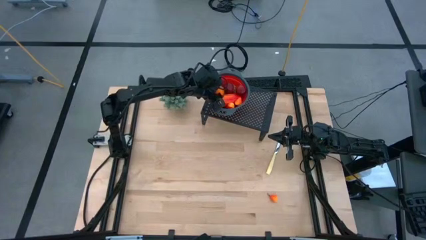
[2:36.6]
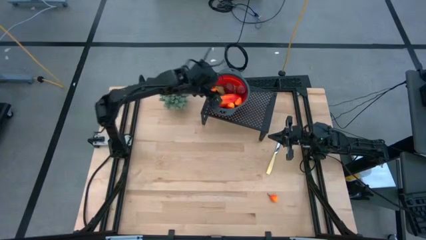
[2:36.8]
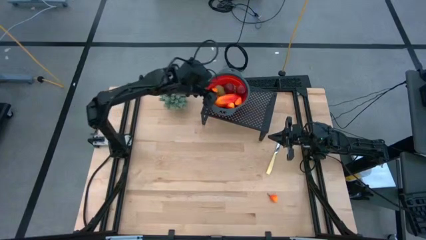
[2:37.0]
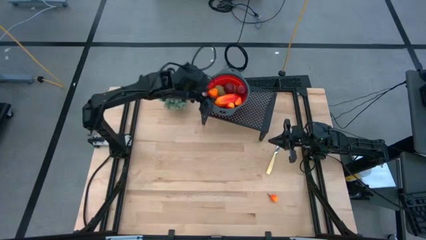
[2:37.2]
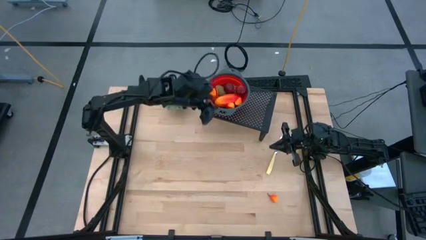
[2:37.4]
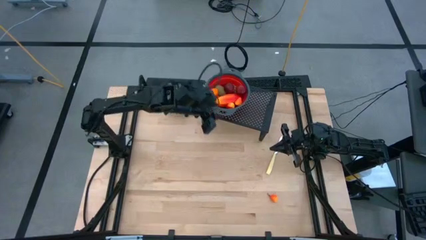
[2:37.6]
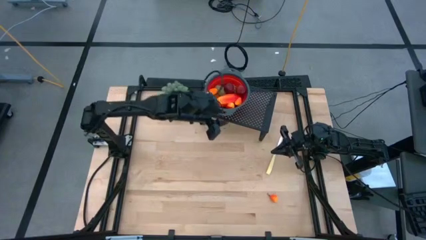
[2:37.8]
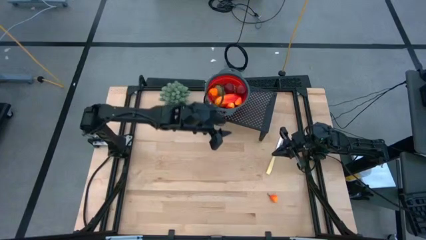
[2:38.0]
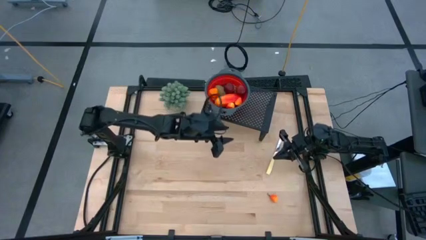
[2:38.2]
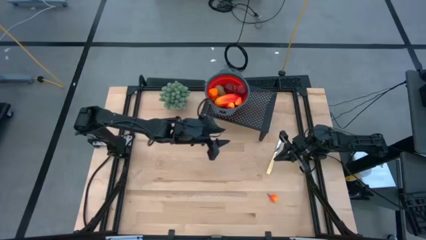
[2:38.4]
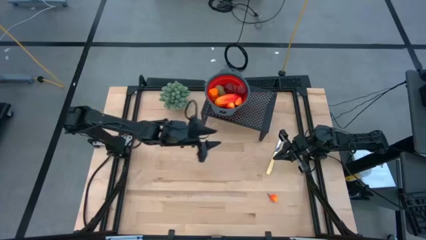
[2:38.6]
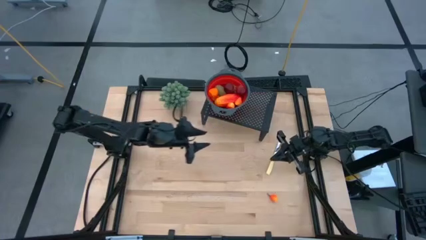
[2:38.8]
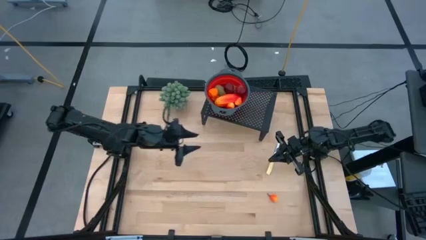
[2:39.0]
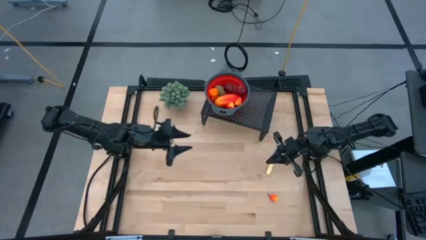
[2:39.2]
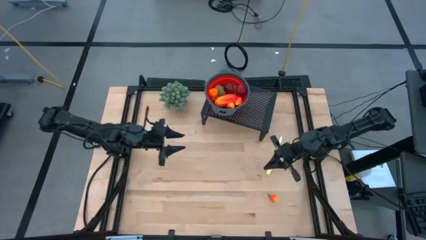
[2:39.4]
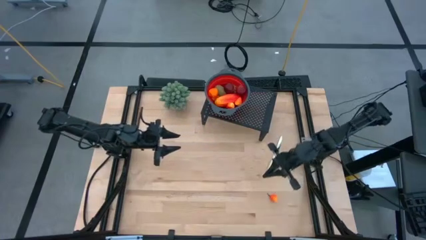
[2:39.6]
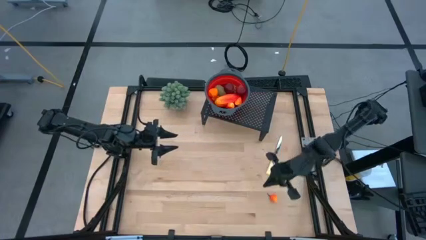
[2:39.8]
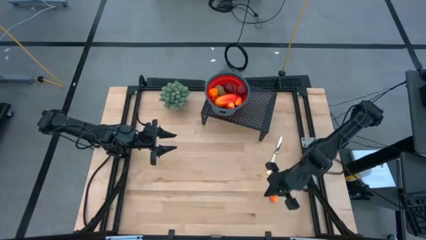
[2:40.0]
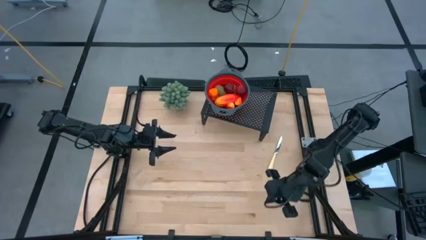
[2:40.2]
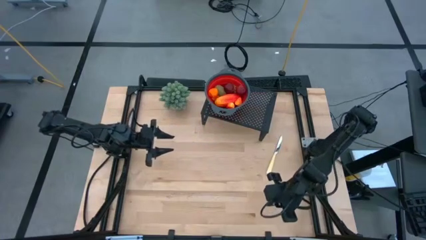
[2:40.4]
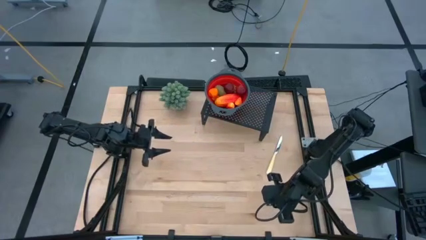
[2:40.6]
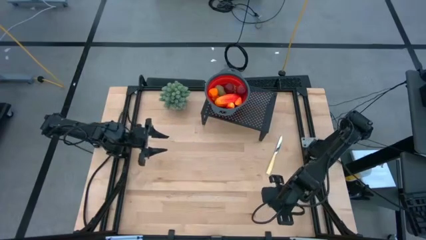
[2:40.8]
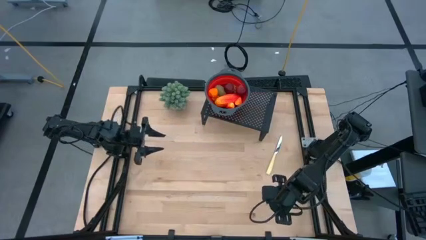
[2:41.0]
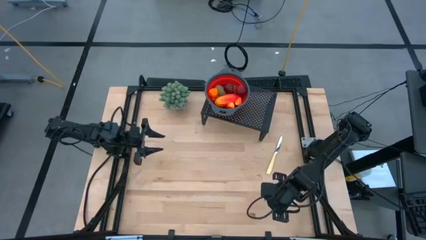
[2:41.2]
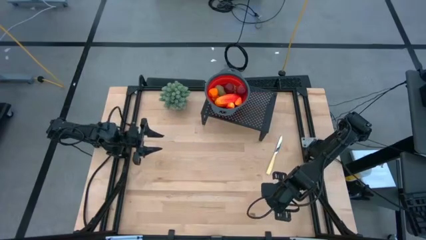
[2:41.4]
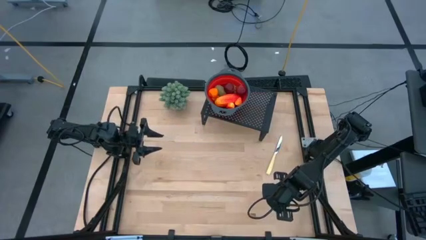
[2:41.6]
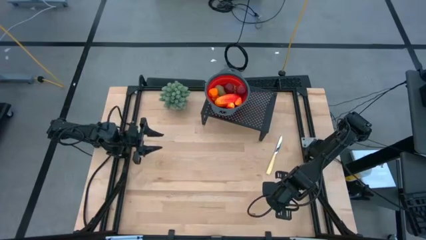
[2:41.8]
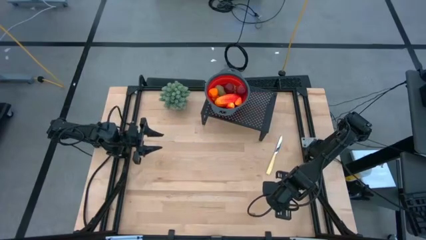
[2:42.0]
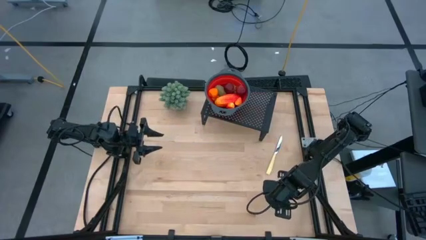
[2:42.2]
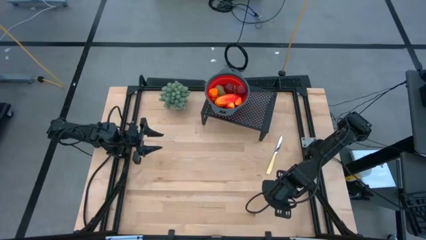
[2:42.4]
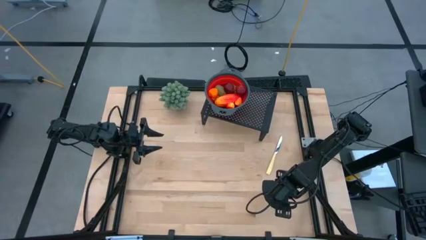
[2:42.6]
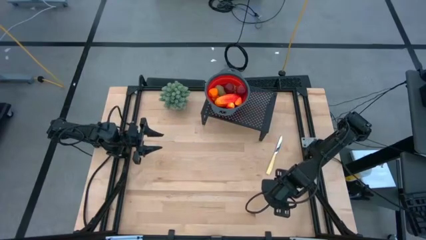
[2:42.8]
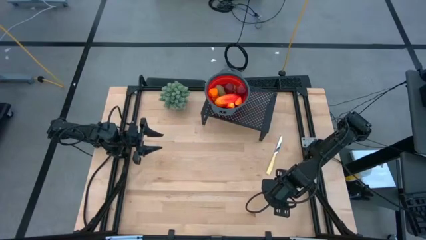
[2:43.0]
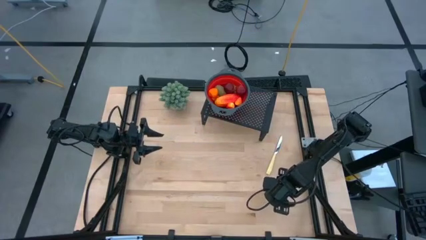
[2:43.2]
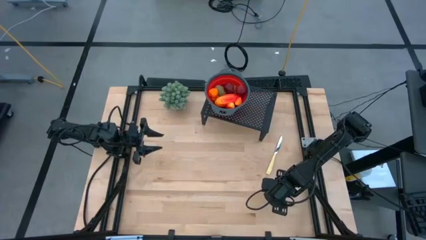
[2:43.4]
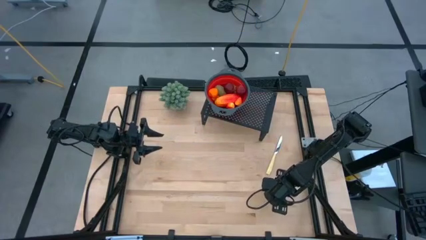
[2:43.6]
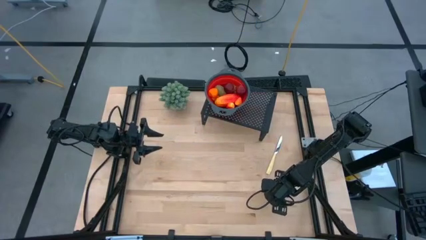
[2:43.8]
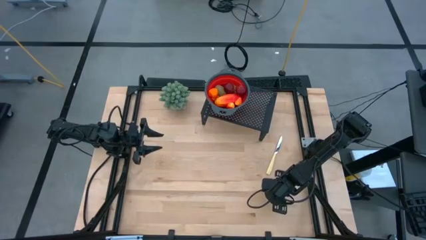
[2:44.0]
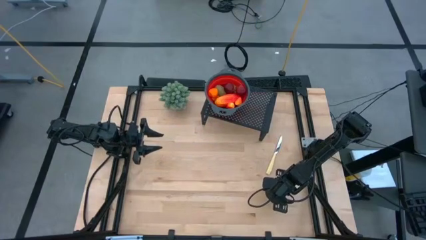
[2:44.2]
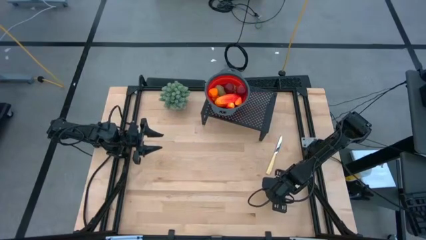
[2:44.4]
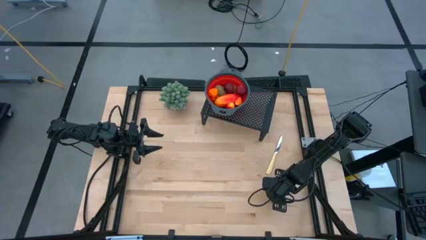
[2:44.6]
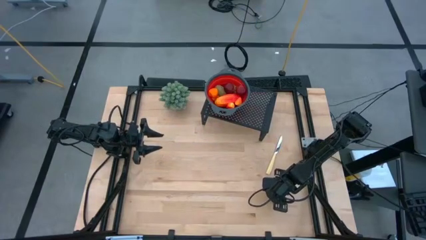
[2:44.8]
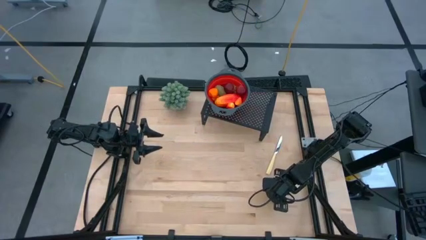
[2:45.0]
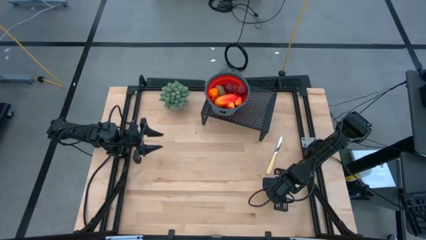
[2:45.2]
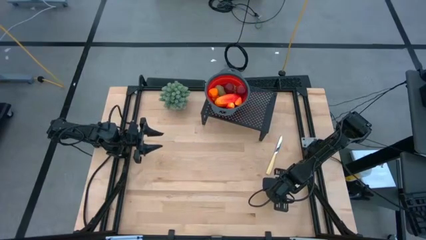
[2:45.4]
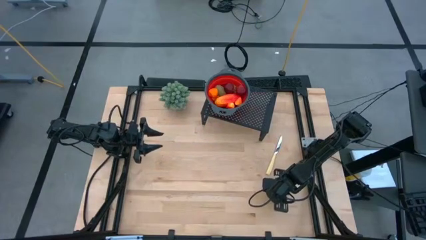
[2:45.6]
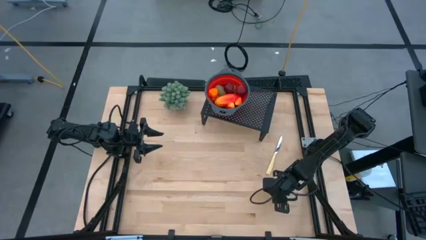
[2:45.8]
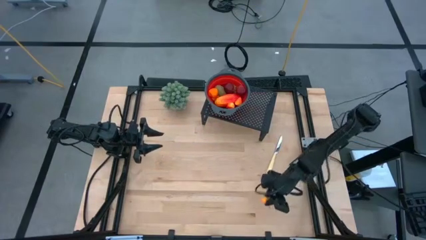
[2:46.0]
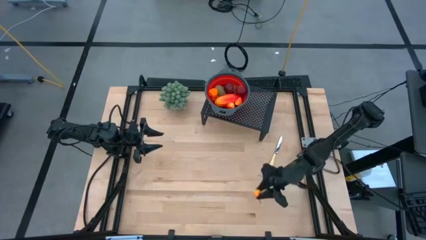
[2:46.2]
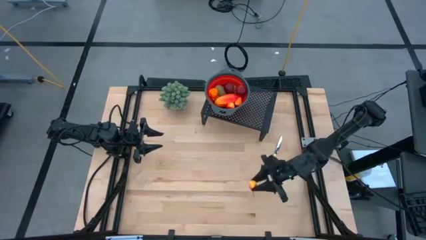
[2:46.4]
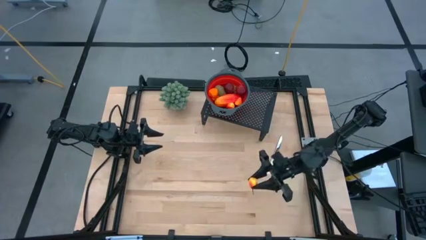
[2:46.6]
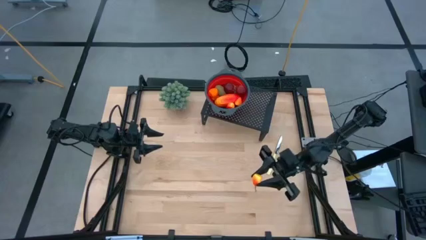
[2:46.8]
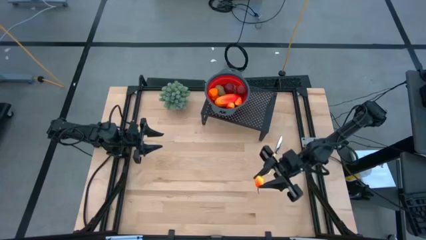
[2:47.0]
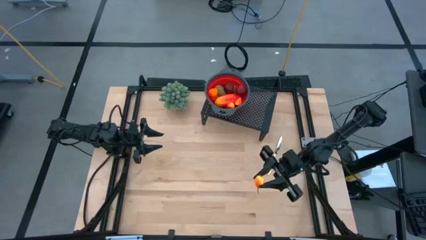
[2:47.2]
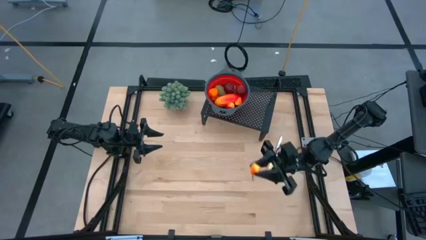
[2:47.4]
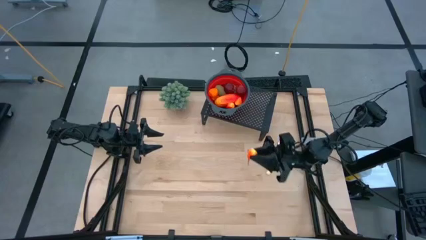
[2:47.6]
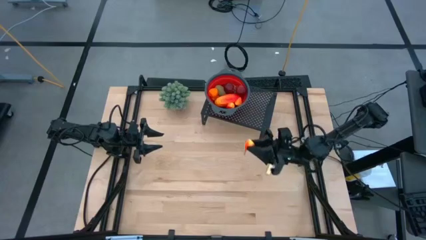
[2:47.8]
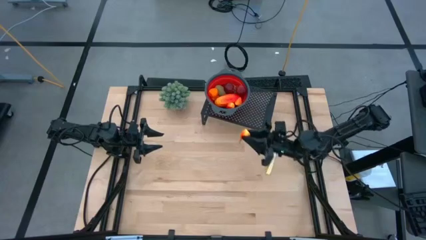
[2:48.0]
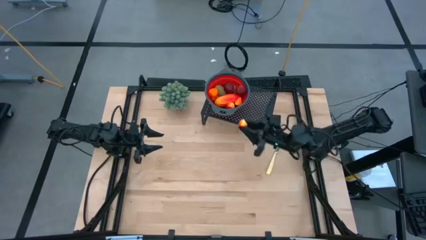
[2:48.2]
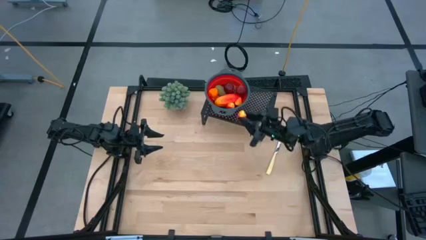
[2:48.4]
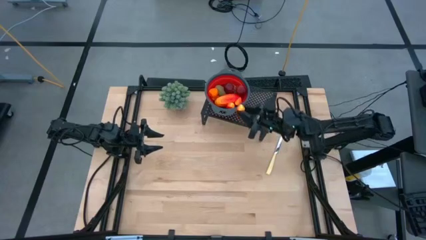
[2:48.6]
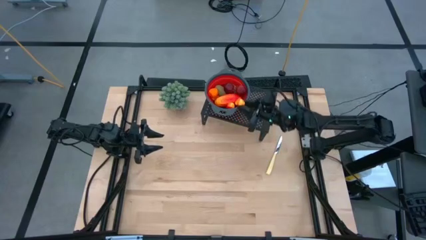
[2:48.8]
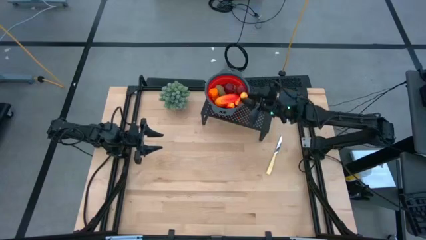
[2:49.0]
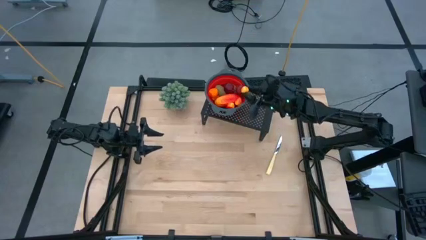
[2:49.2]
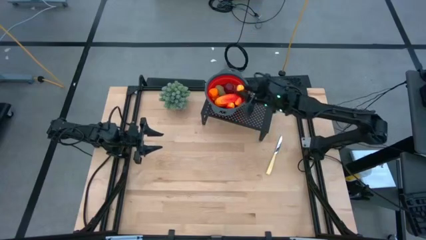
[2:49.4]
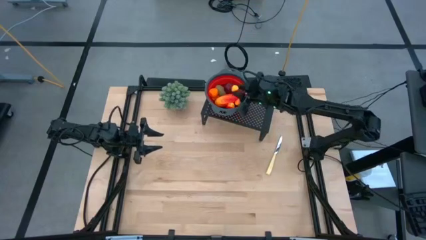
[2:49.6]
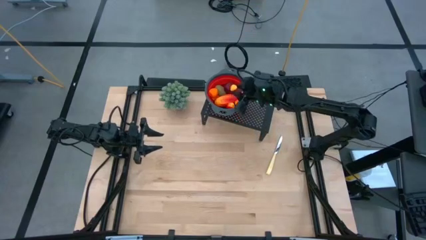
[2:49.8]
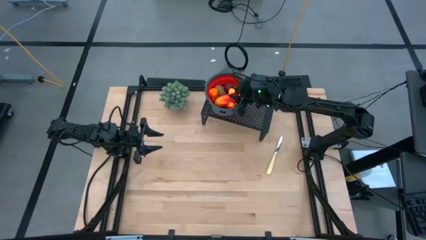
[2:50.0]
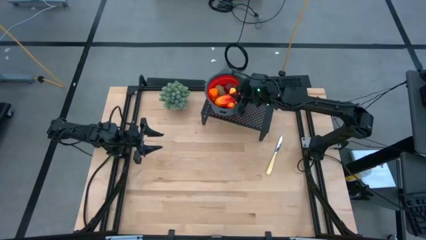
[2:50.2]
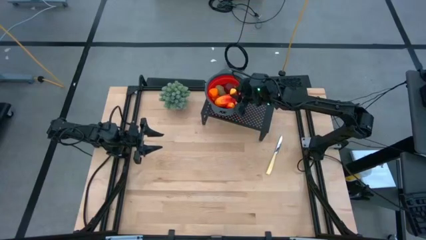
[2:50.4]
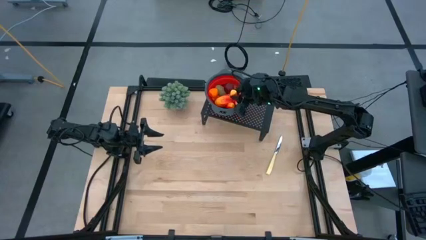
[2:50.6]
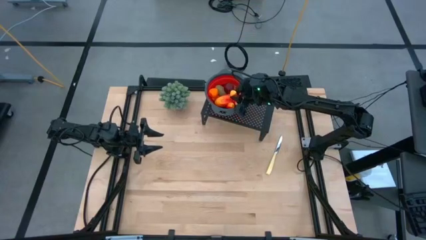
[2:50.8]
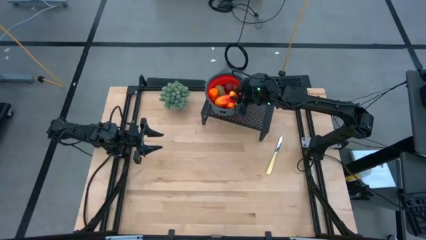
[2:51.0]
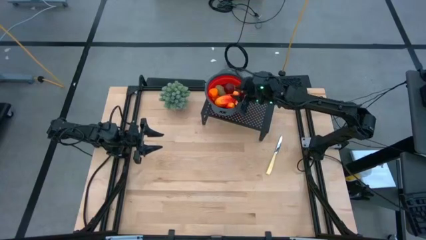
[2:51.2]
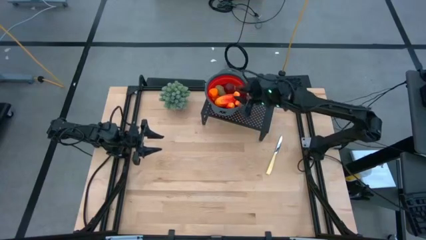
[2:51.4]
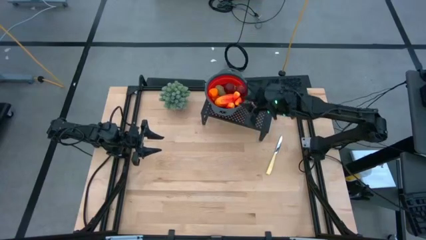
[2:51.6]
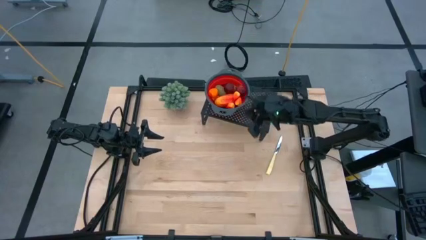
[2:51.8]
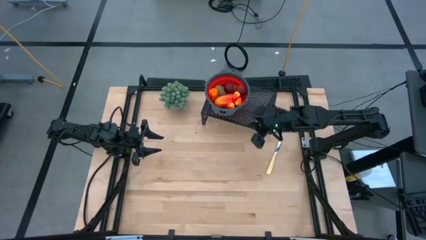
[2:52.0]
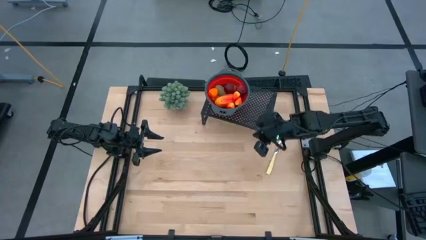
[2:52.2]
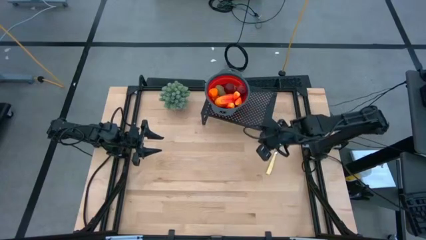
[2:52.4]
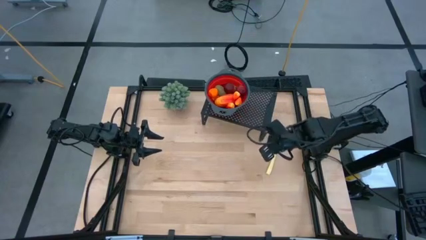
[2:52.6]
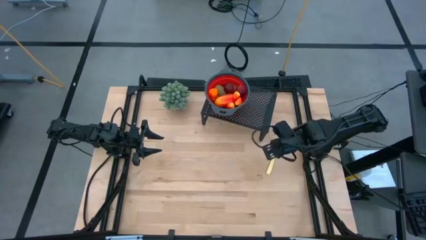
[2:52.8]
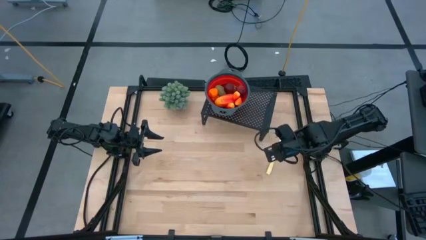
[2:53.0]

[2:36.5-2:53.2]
Task: Pick & Place Fruit
Put the pear into the red strainer bowl

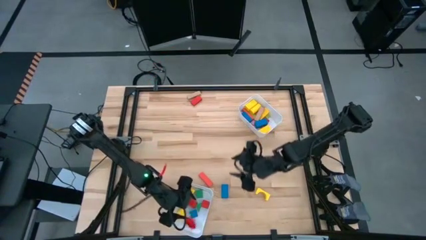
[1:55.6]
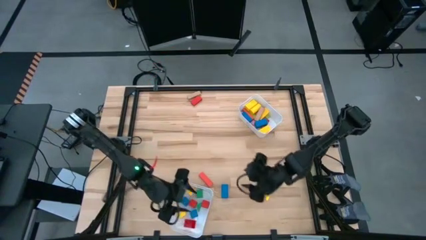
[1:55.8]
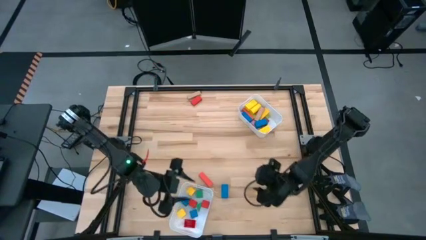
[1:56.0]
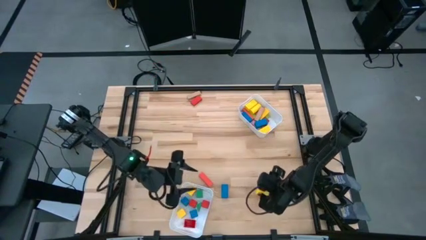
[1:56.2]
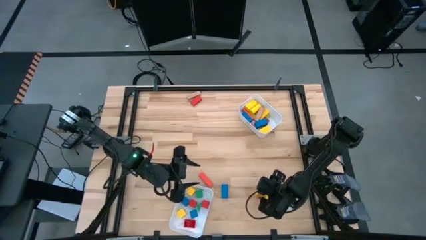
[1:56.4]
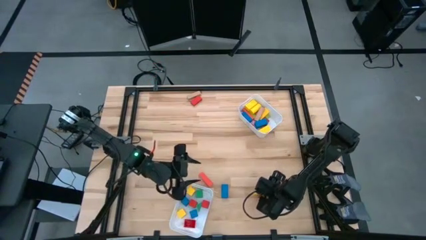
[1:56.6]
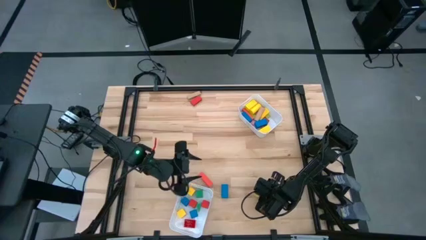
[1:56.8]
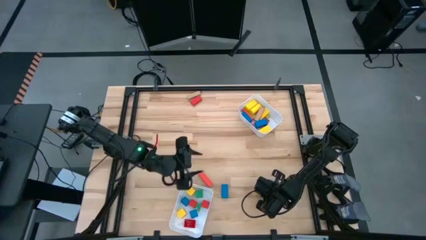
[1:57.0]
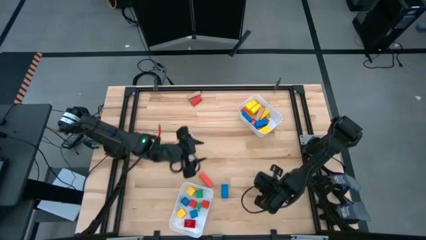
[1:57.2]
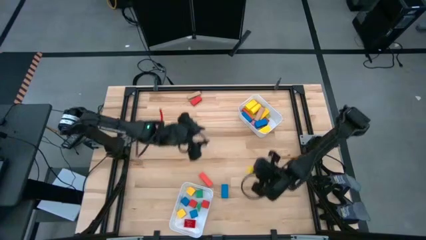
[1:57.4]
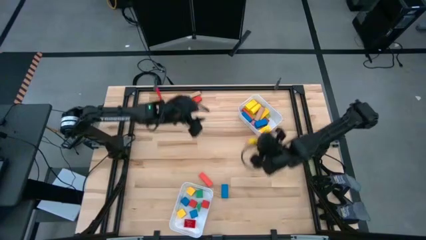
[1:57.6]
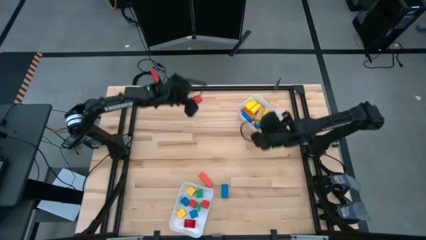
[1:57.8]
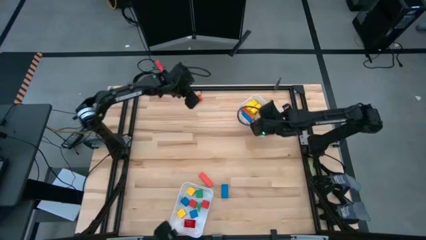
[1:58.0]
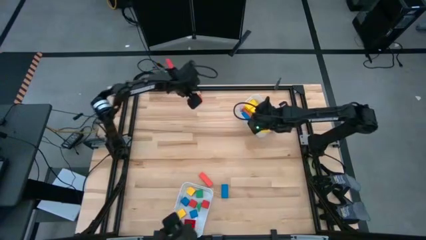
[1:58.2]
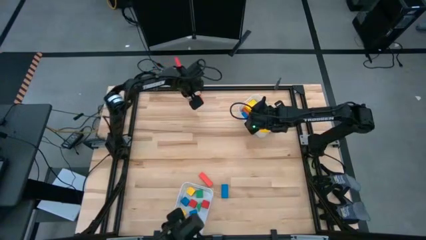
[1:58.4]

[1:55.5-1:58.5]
Task: Sort blocks by size
Put the yellow arch block into the top white bin
